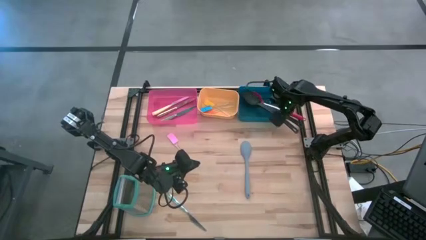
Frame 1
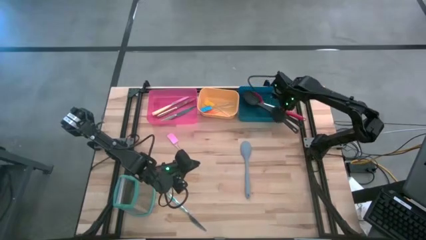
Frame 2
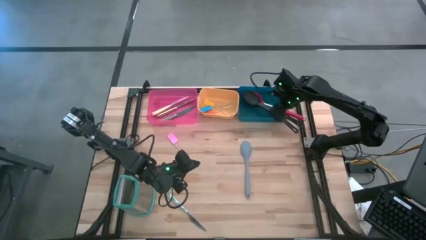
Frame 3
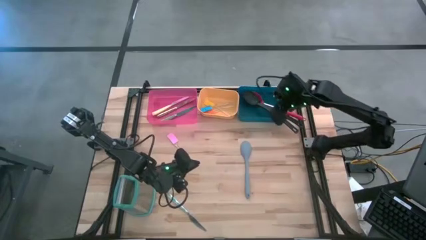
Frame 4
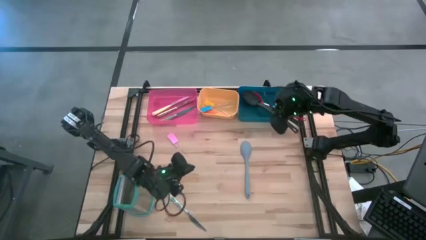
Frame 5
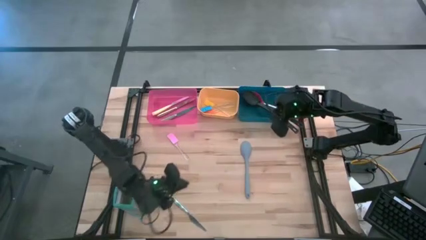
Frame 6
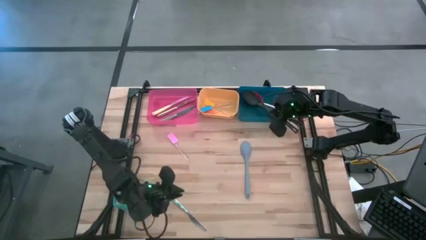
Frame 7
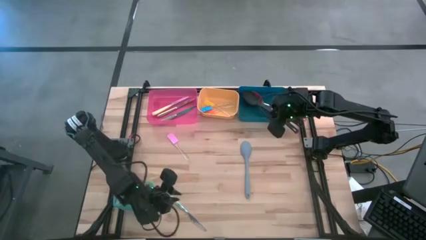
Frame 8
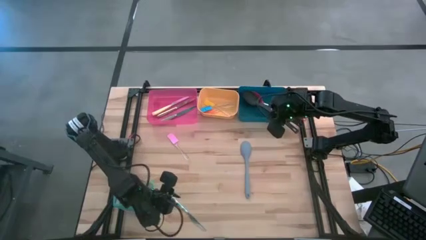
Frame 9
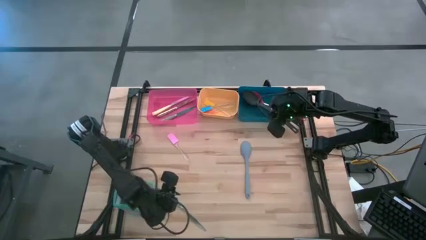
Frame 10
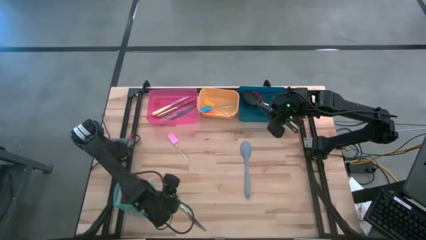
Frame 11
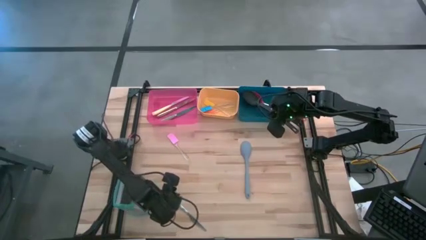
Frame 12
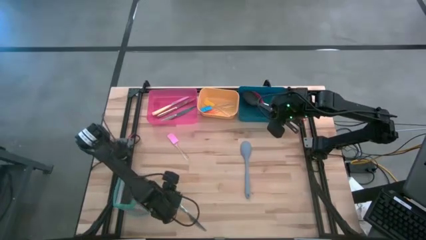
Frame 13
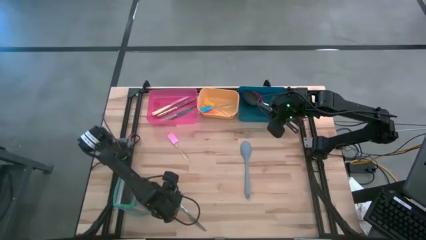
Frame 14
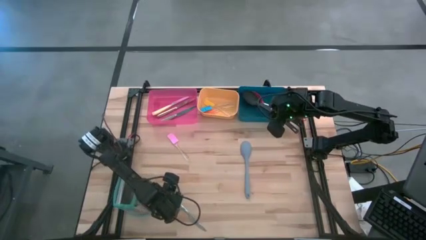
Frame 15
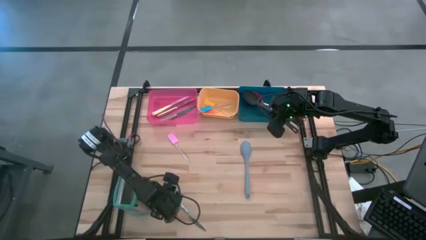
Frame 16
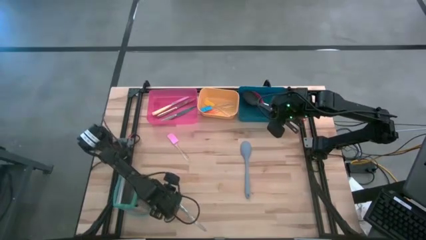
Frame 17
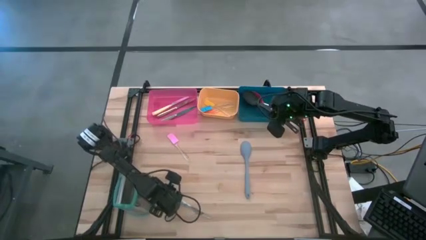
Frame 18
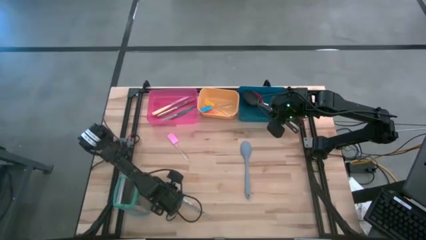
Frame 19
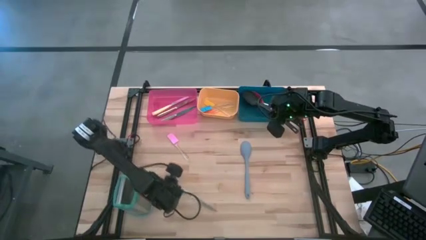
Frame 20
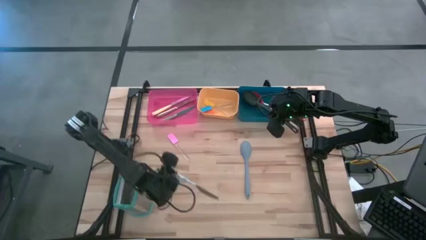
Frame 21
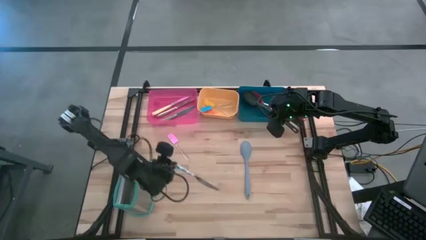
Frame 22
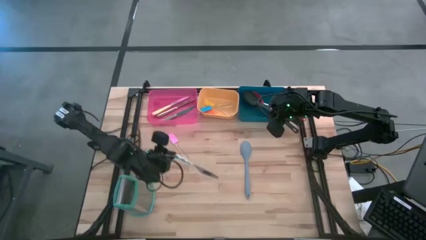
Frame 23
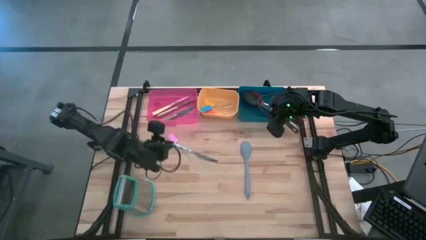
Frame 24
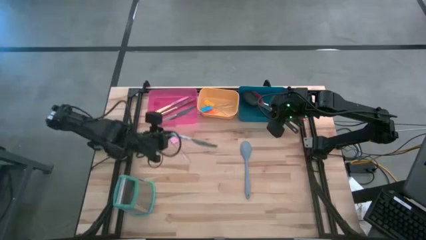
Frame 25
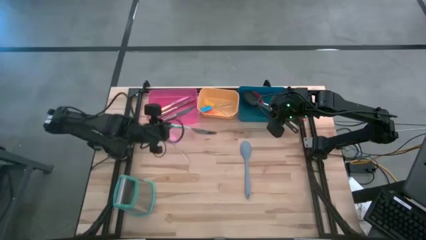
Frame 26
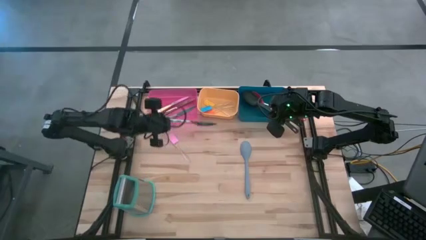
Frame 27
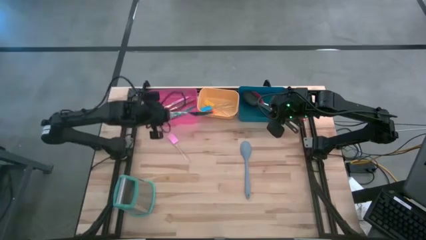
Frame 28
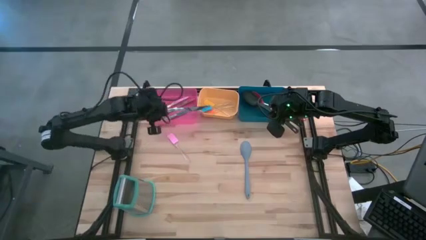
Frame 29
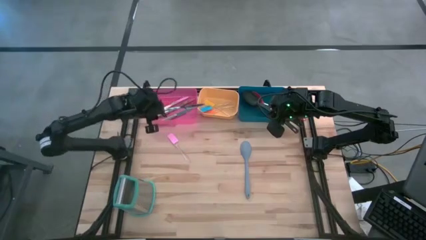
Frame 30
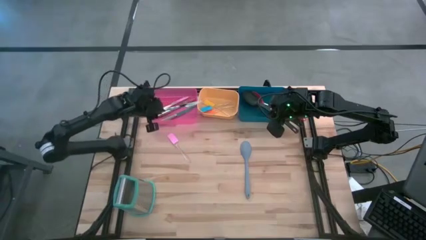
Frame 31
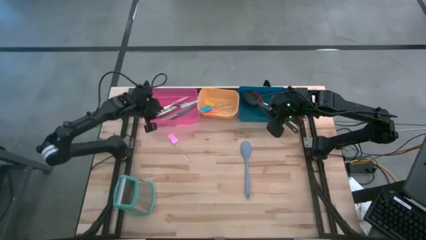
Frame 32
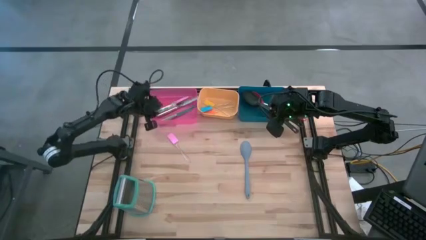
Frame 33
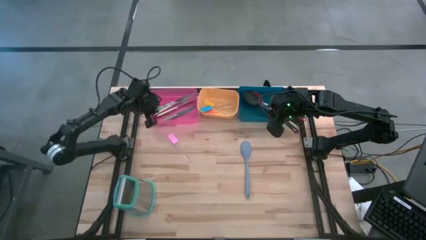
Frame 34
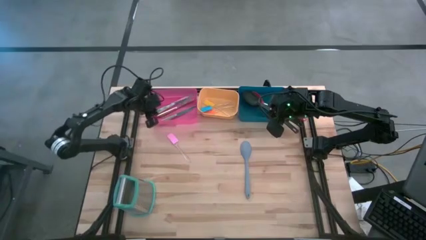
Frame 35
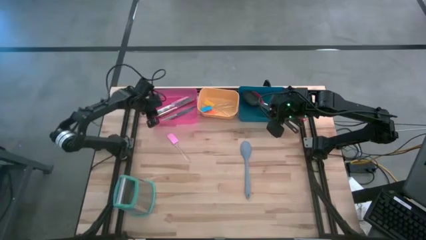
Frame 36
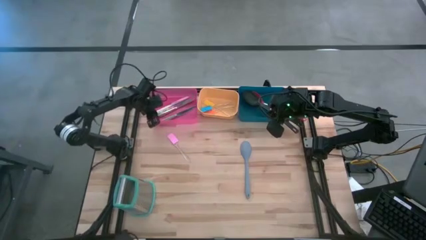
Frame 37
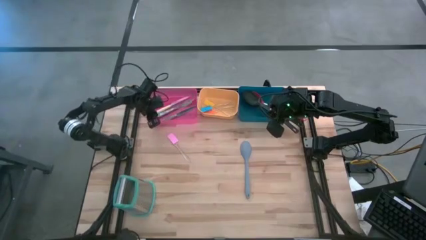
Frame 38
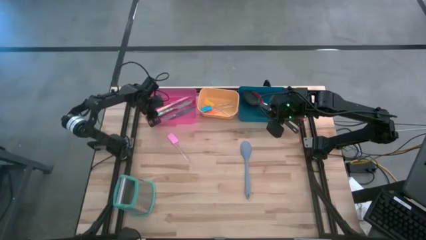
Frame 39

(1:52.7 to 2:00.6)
Task: Pick & Place Kitchen Items
Put the blue knife into the red bin

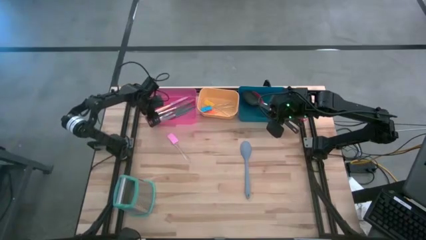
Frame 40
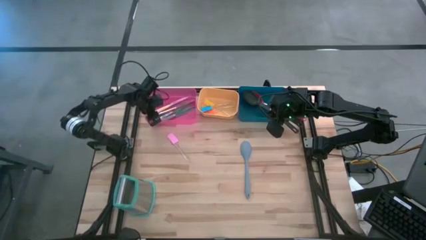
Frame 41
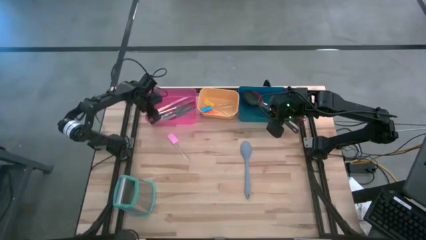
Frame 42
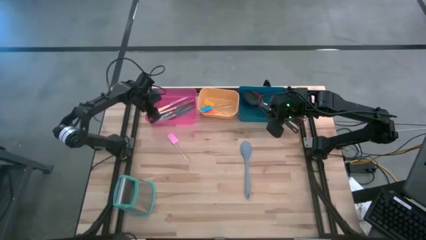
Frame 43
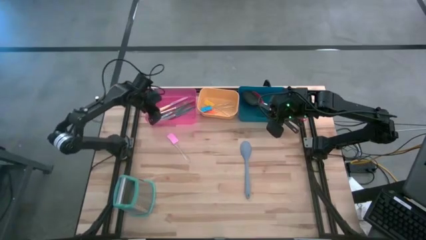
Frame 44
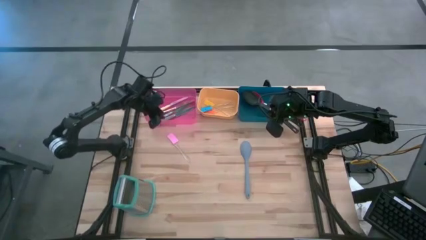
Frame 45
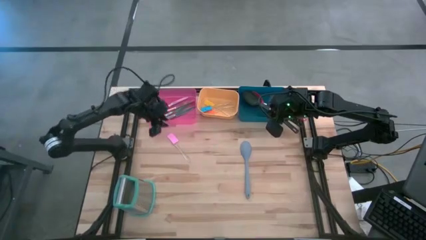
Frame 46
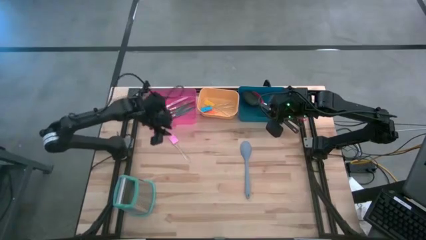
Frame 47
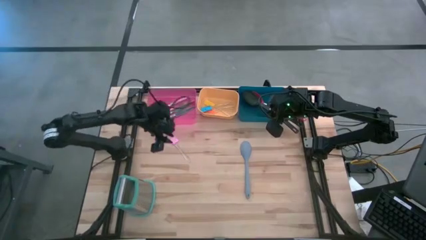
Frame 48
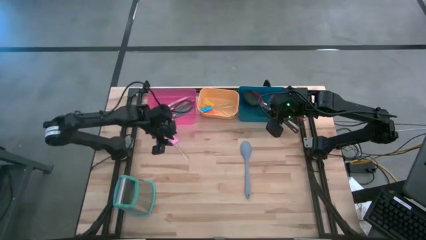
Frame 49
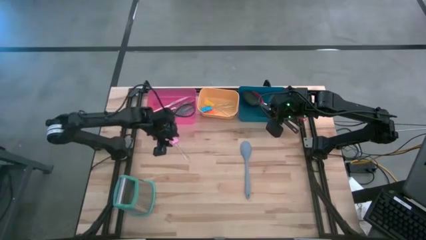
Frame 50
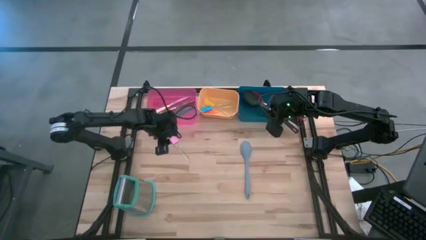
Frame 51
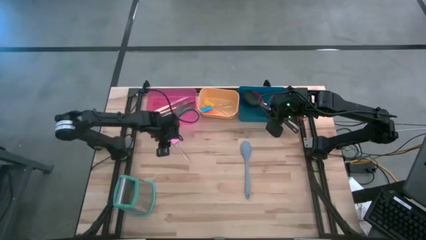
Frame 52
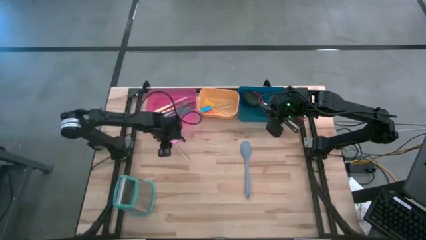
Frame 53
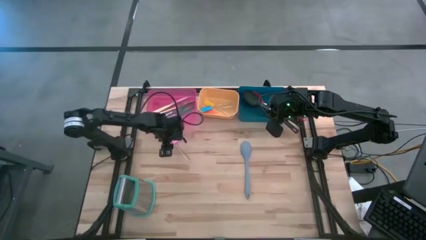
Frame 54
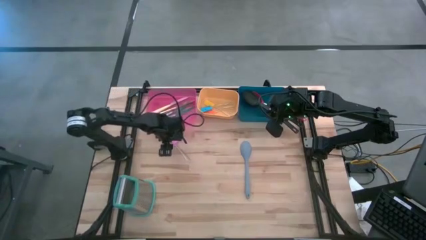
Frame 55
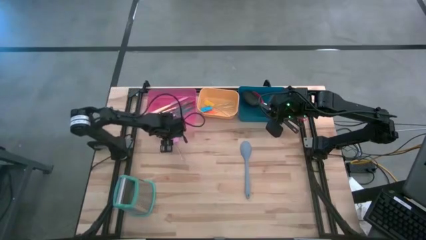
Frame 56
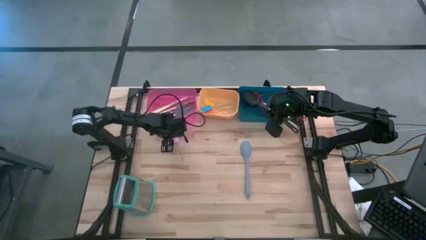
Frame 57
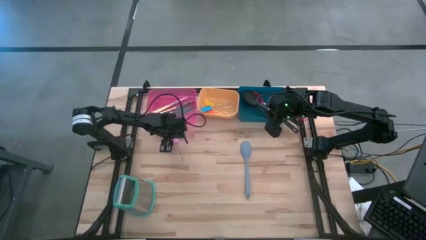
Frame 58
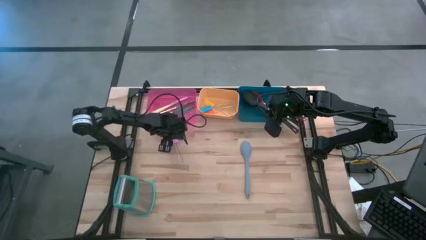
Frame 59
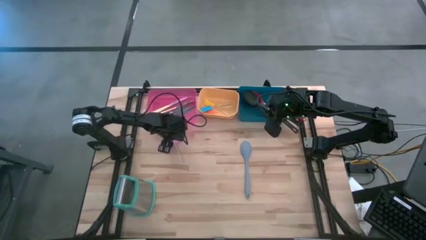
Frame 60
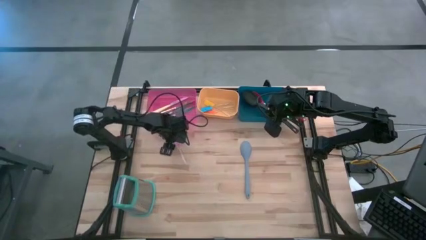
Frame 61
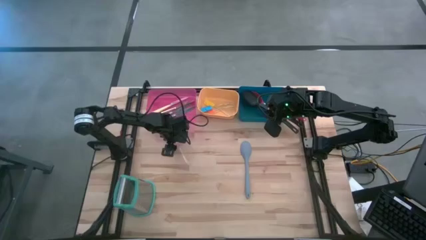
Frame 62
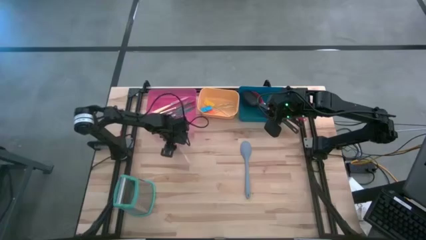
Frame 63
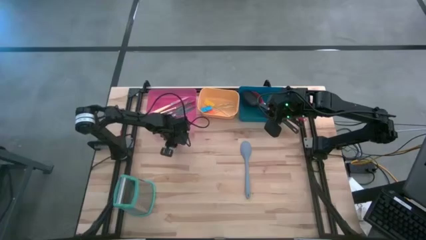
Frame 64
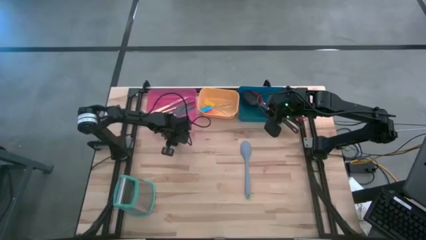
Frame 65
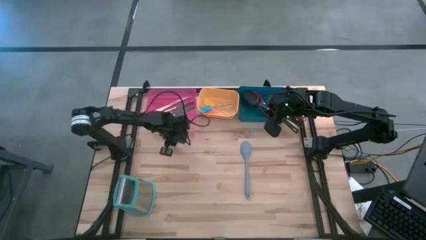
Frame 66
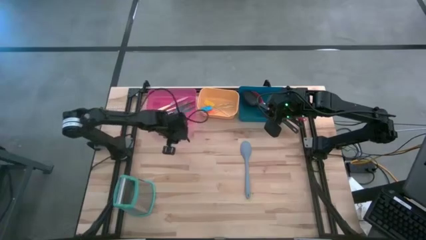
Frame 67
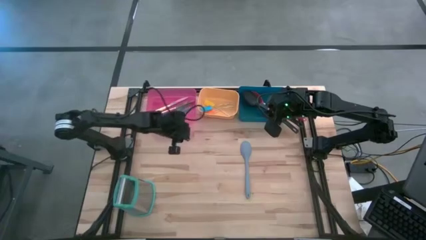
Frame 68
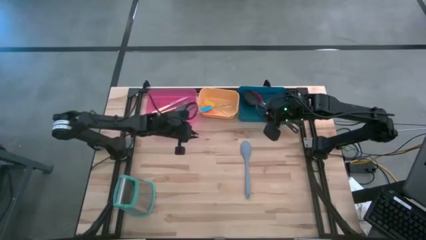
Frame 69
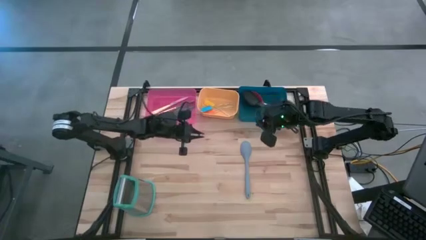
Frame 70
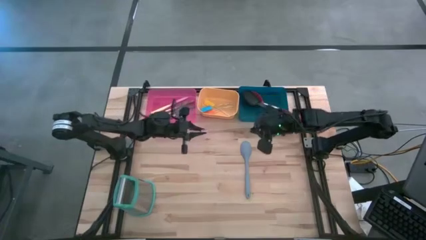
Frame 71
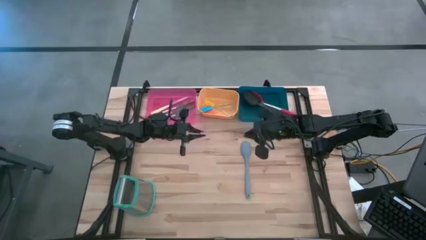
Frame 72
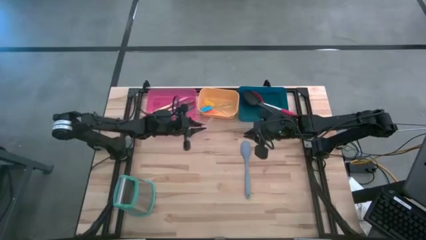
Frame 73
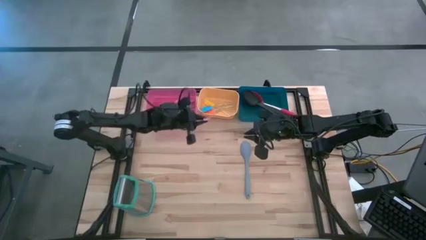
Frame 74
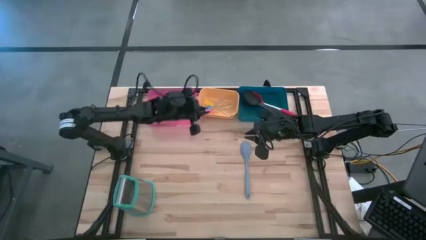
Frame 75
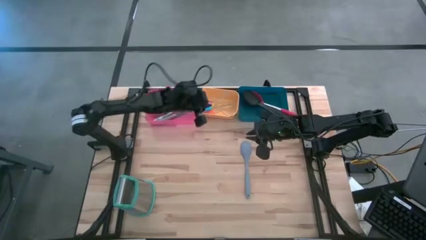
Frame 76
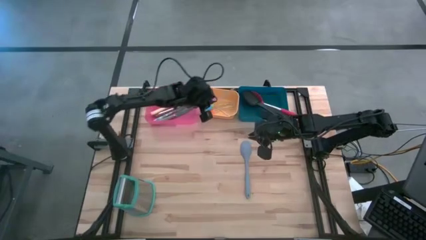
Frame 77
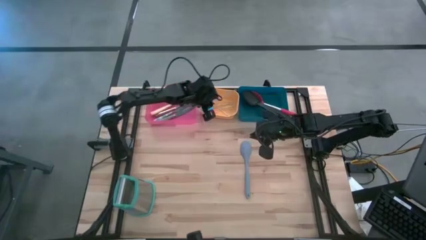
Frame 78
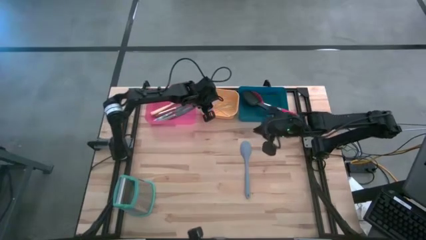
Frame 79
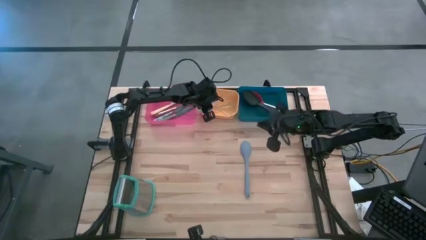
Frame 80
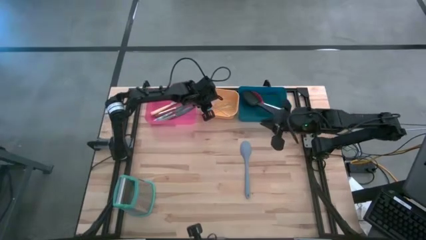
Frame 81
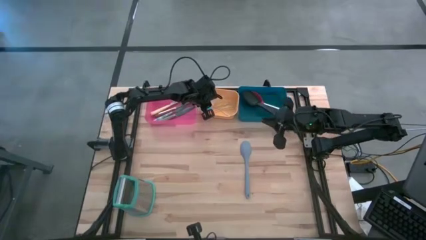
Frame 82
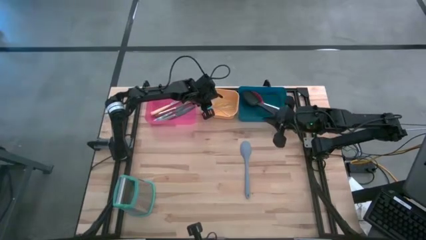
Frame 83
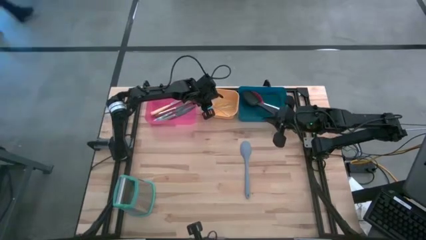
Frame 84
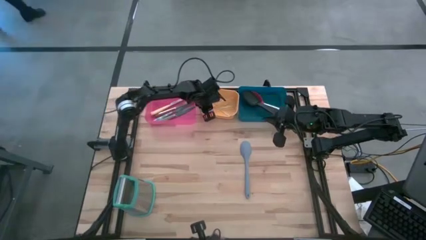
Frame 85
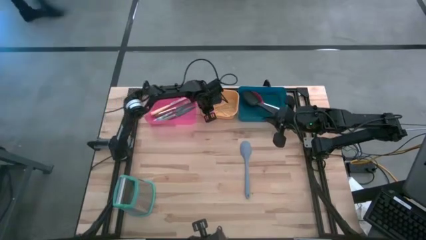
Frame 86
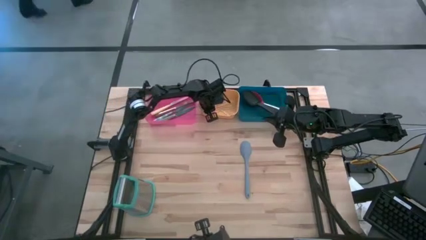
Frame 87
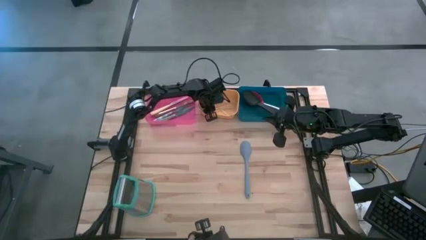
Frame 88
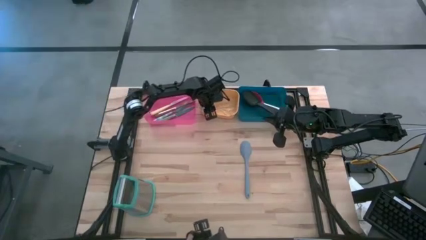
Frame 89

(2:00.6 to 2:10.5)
Put the pink spatula into the yellow bin
